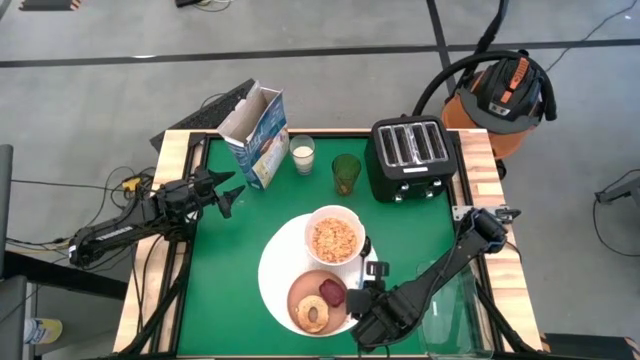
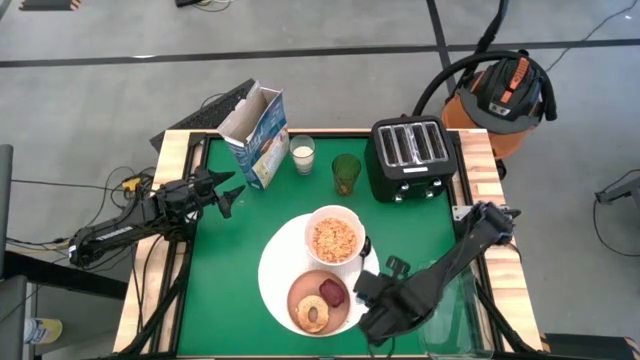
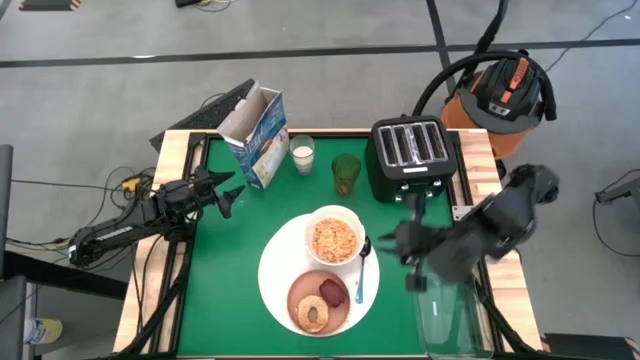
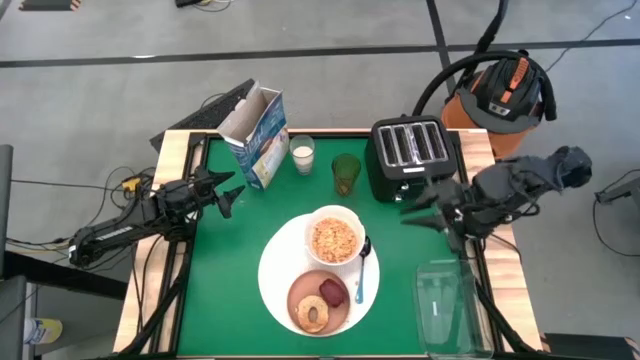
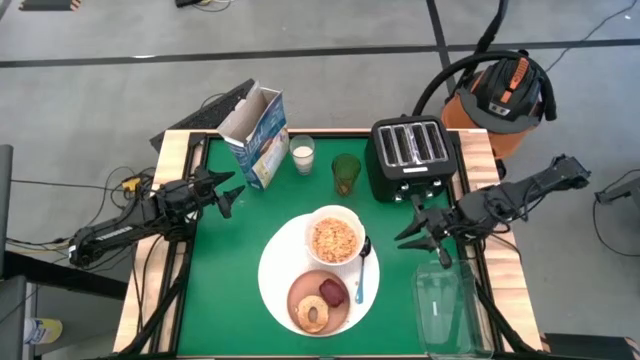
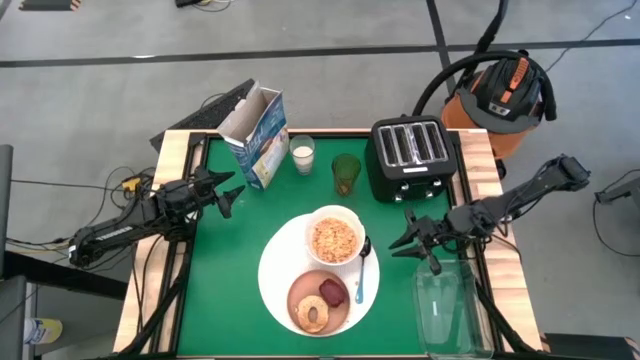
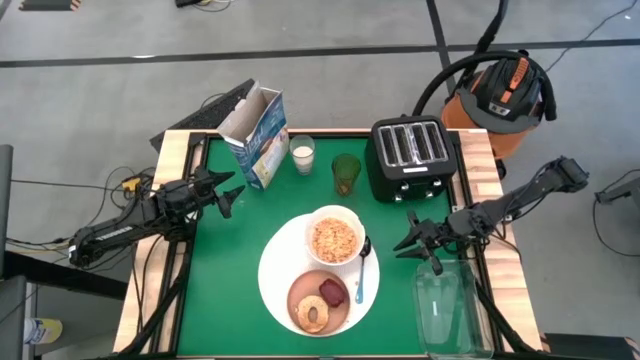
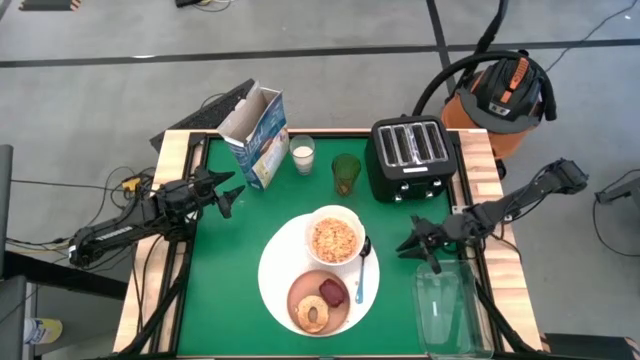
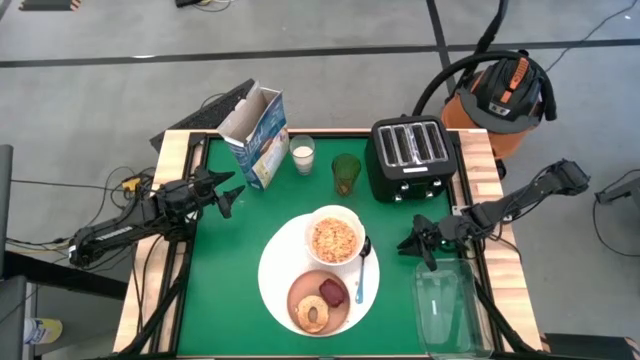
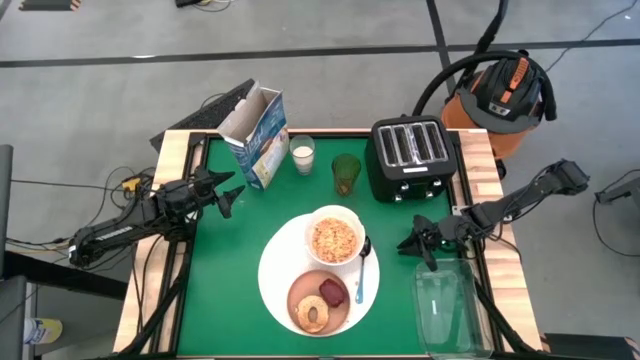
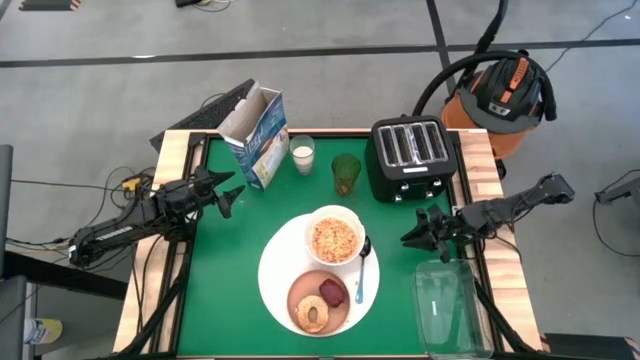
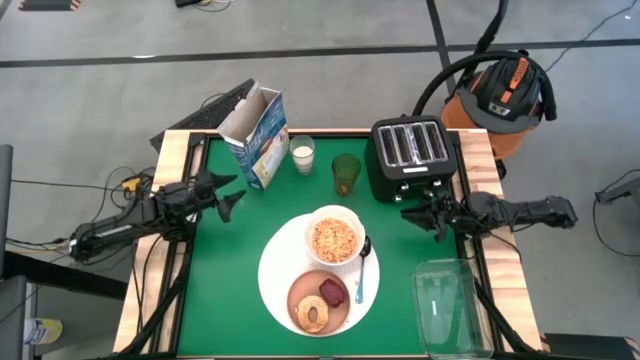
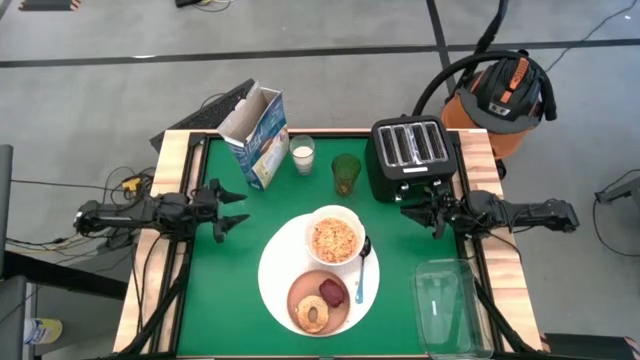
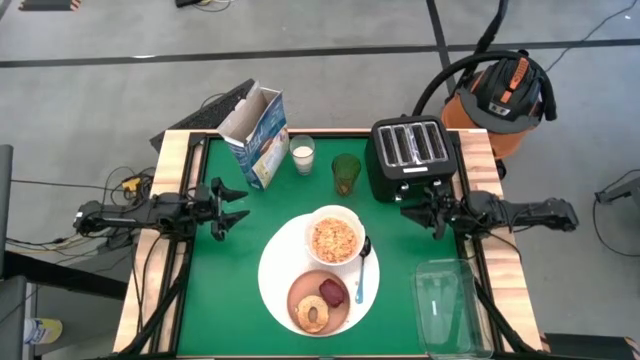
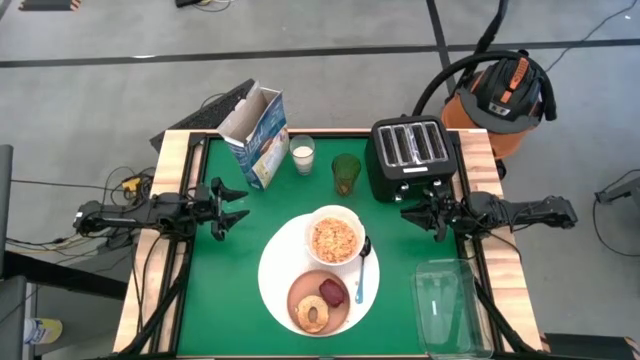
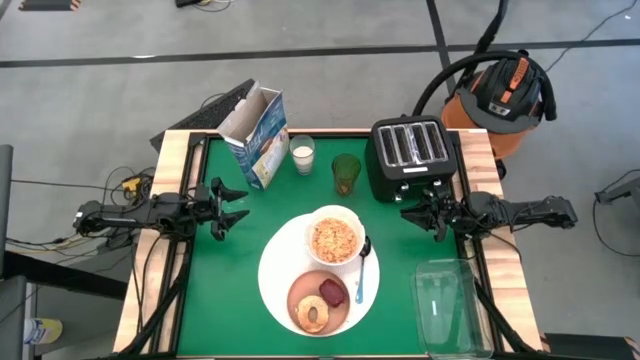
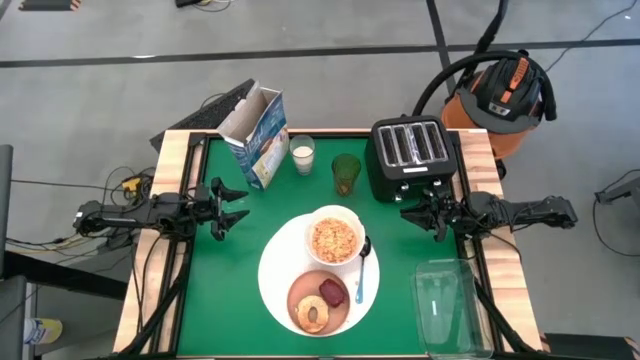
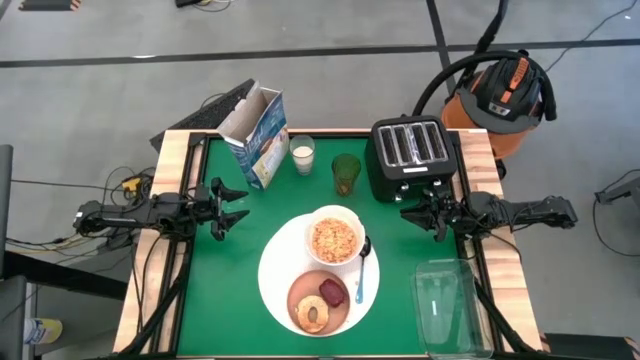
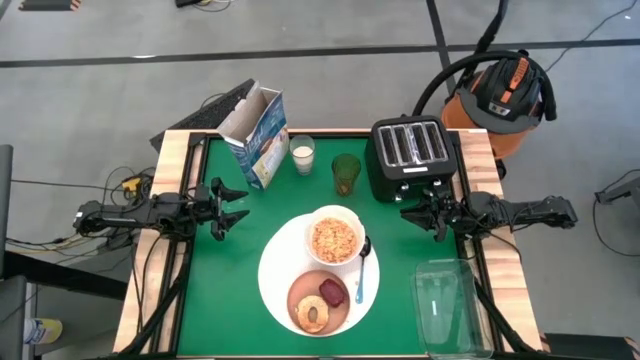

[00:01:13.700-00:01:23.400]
Task: Arrange a breakfast setting
Return to Home Position

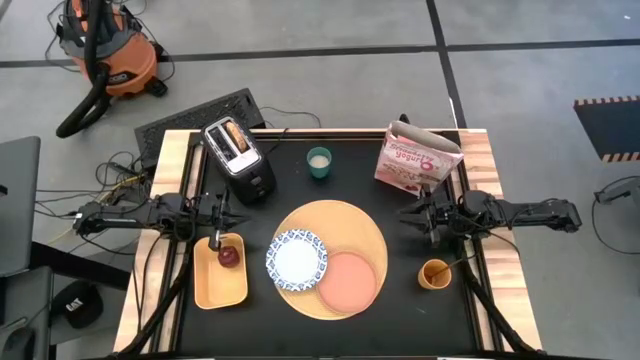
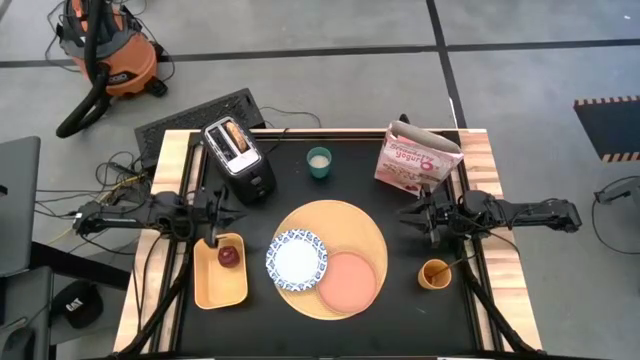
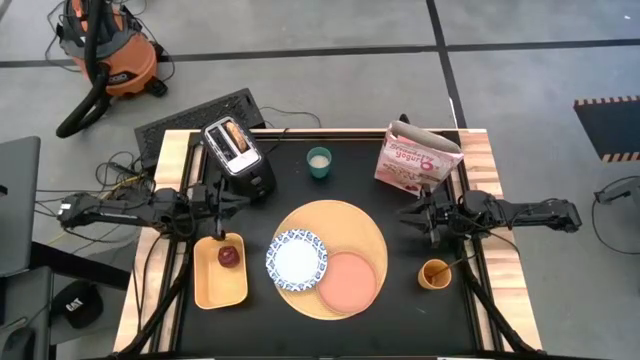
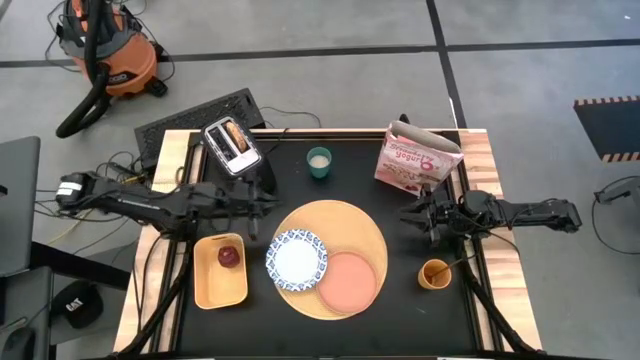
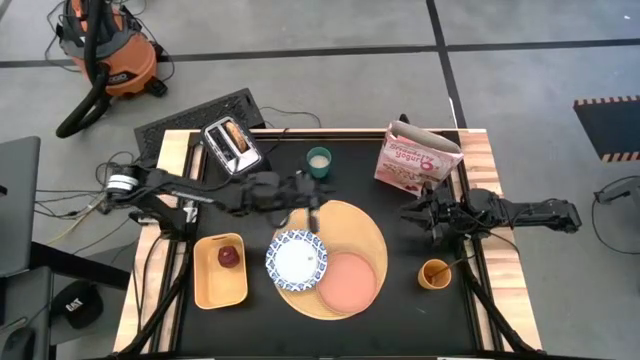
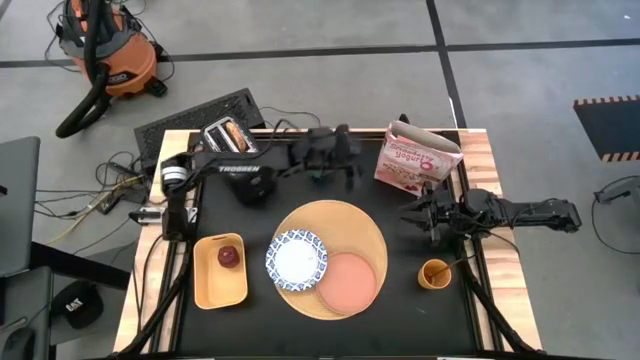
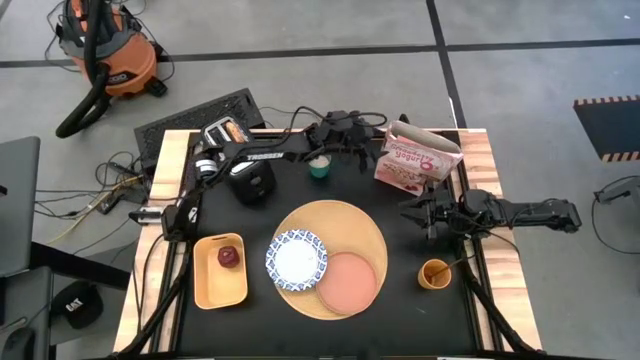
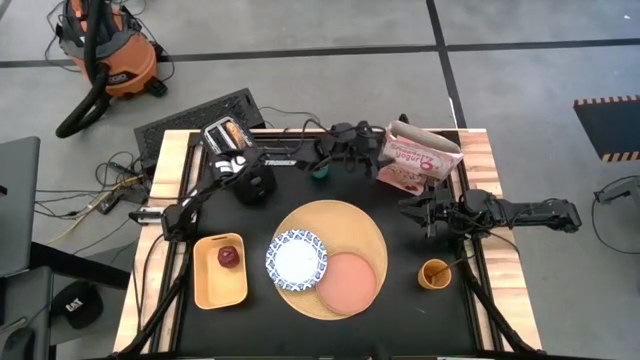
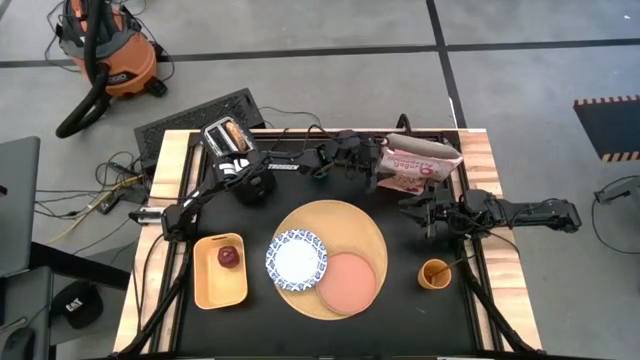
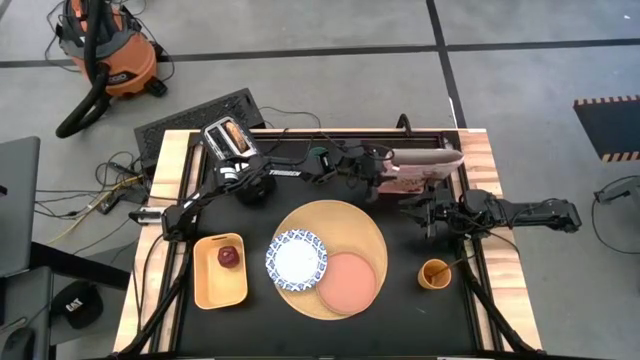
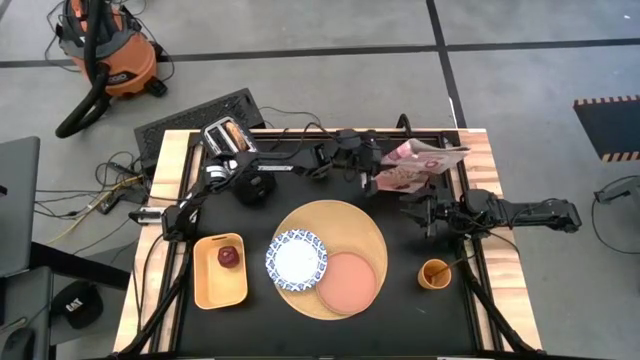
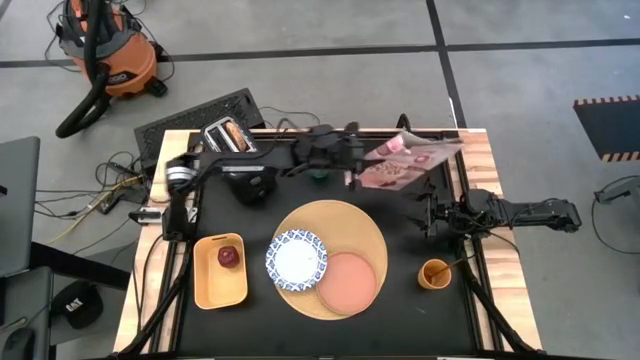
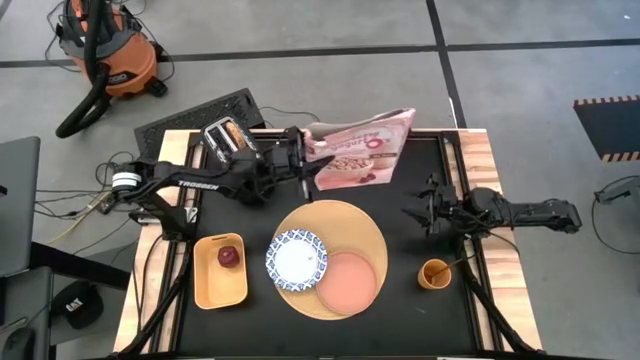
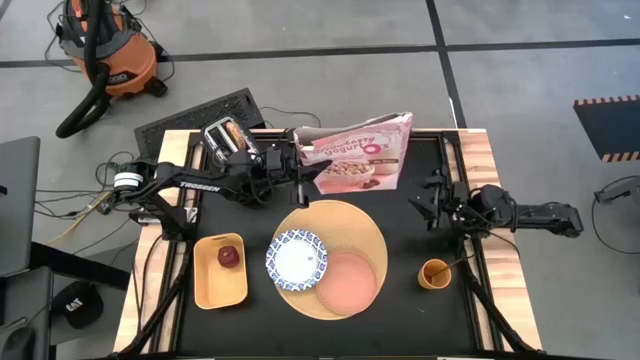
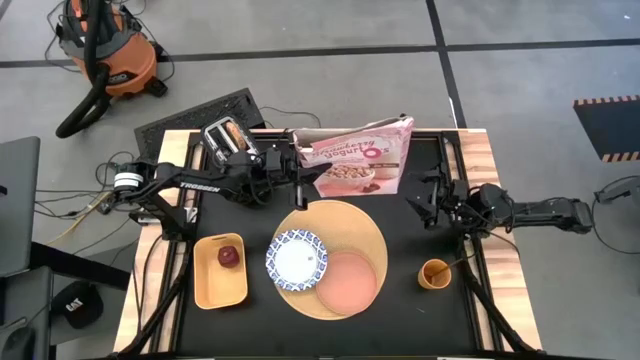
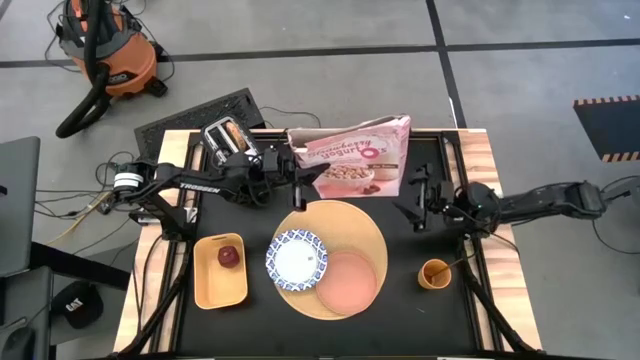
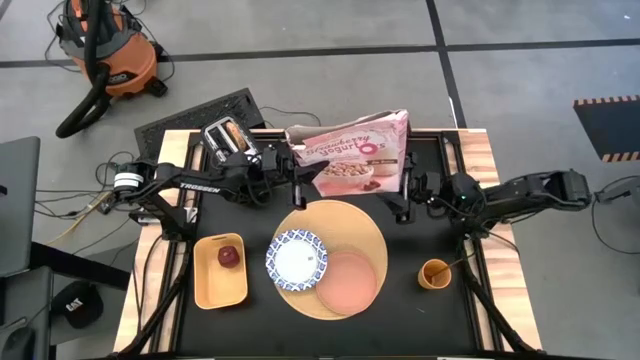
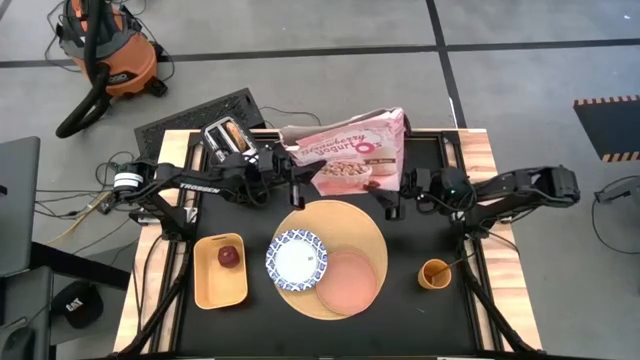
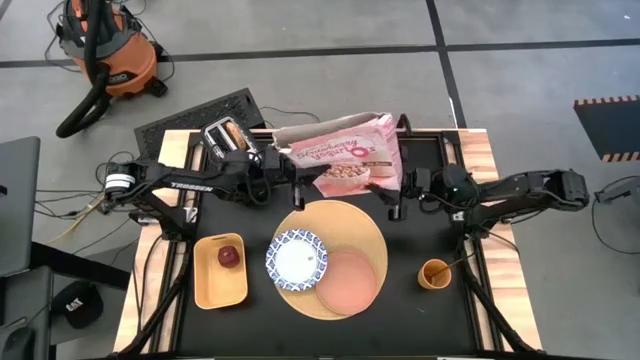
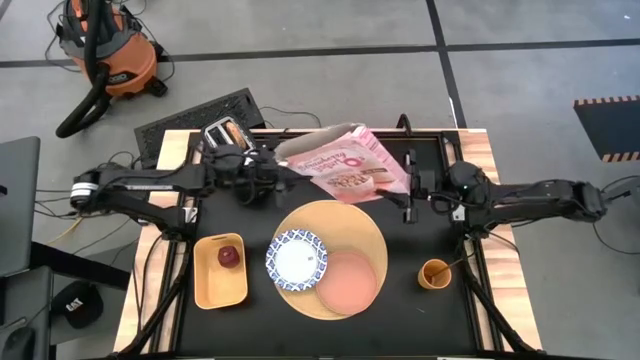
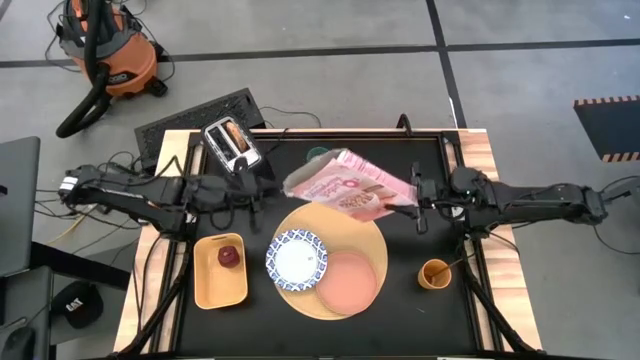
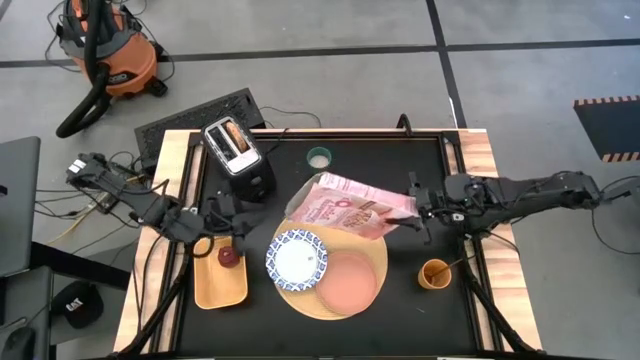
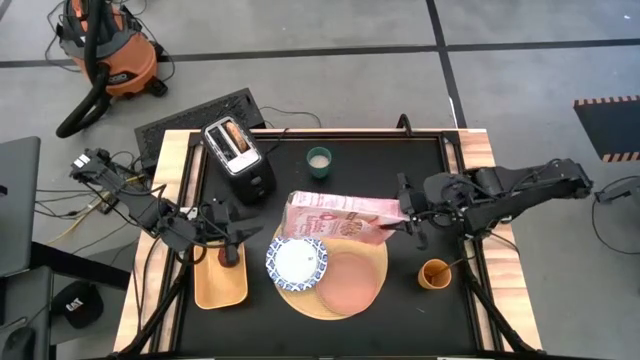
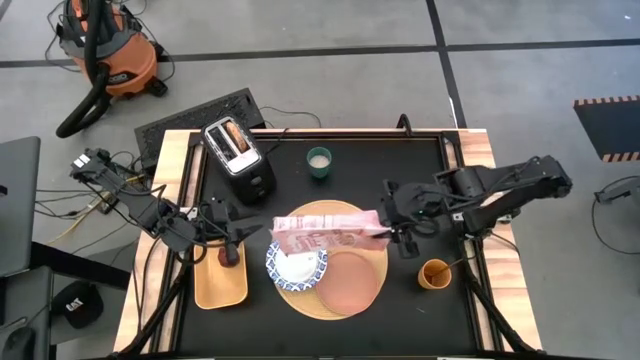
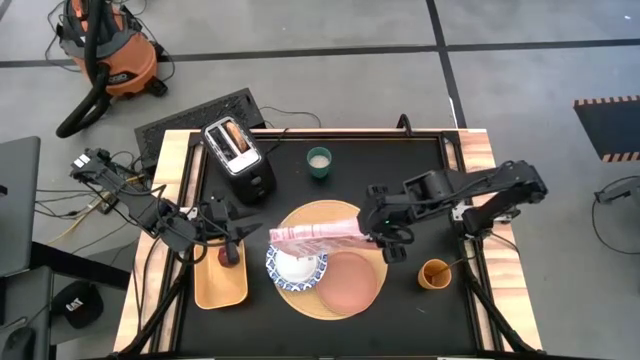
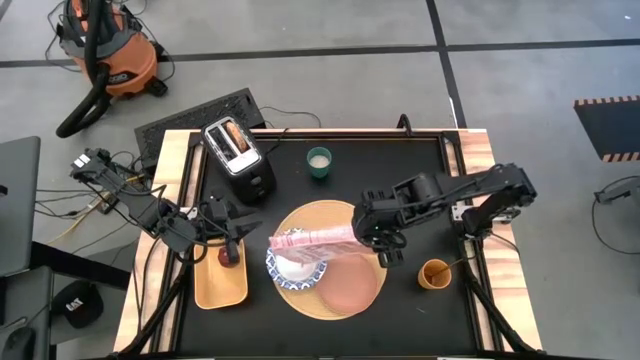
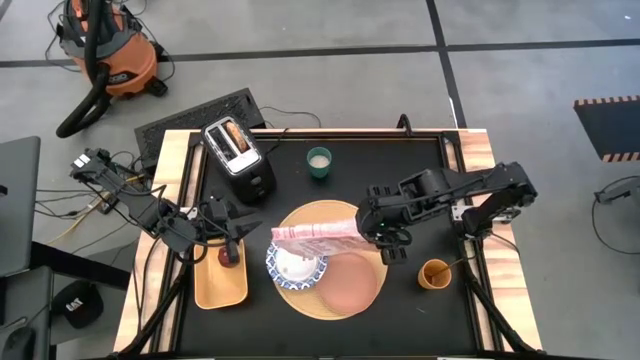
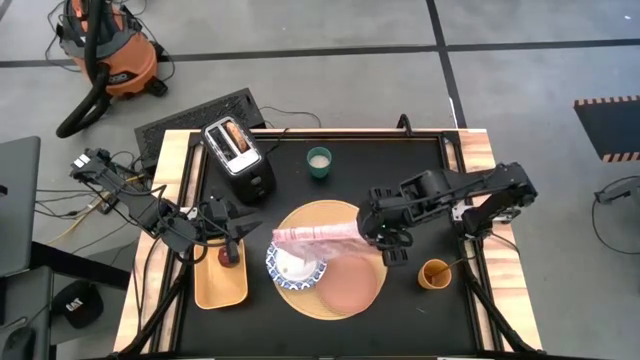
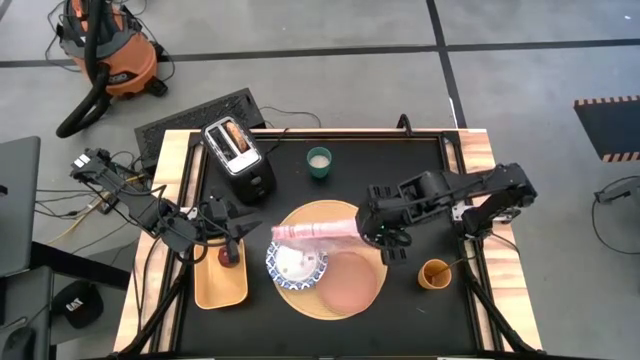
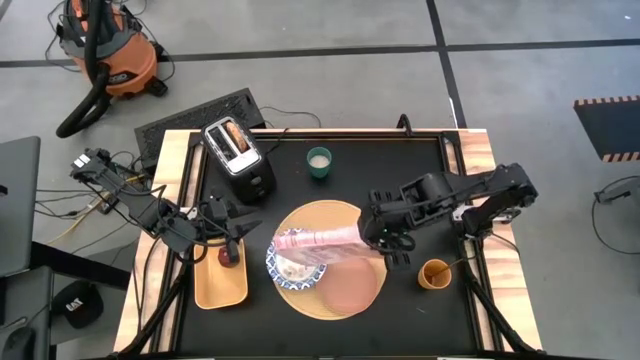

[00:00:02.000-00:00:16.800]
Task: Arrange a breakfast setting
Pour the cereal into the bowl
